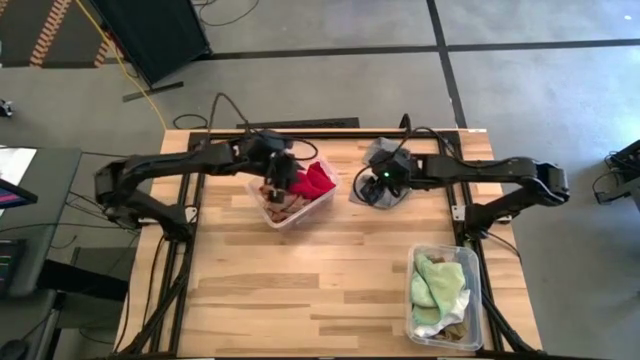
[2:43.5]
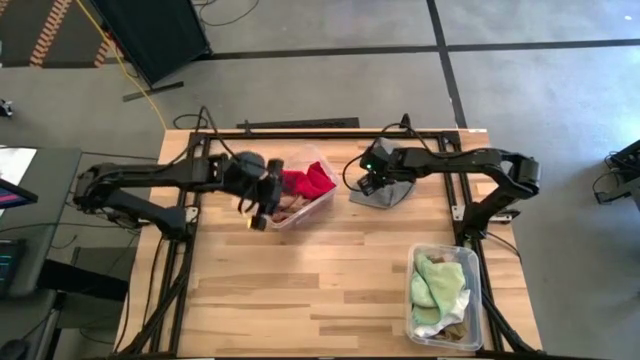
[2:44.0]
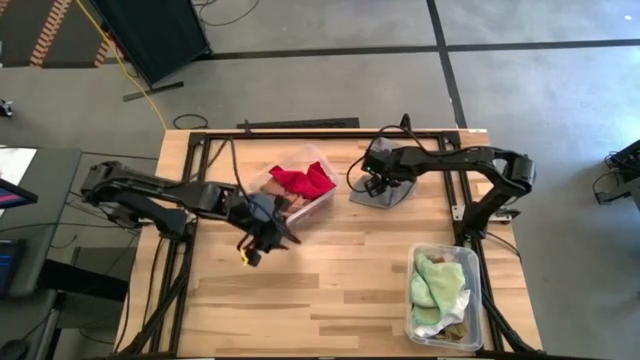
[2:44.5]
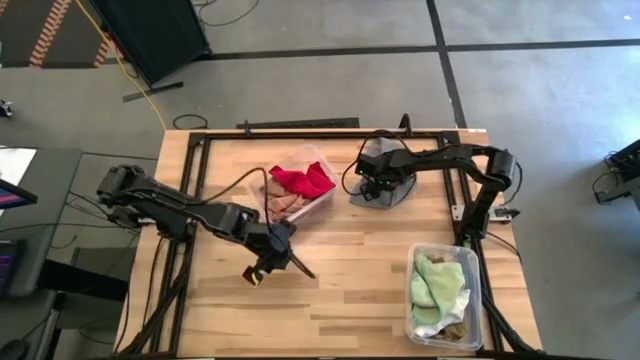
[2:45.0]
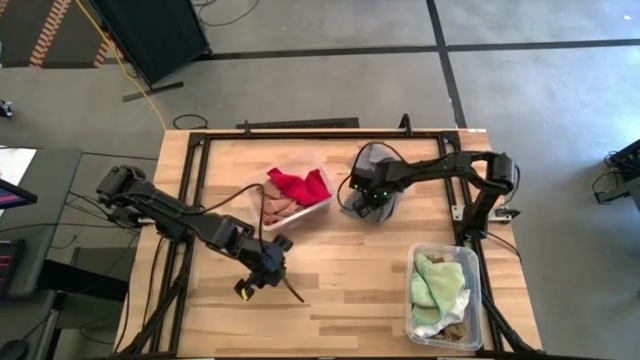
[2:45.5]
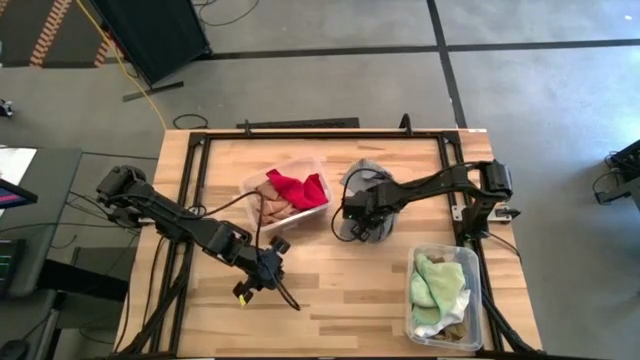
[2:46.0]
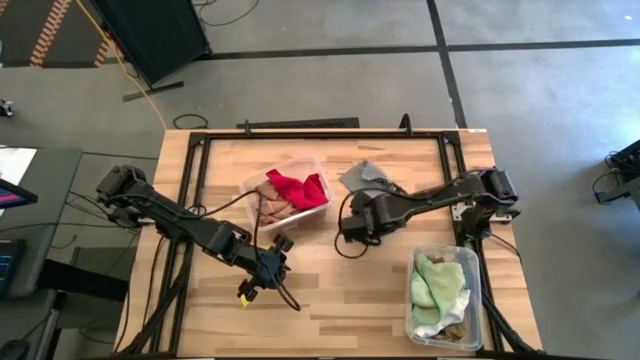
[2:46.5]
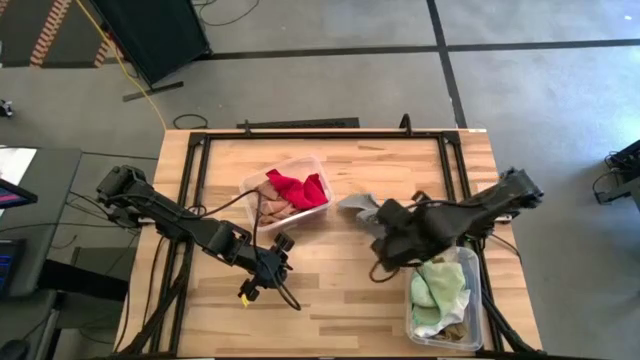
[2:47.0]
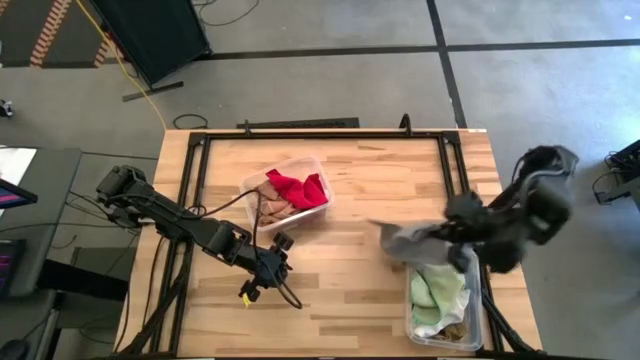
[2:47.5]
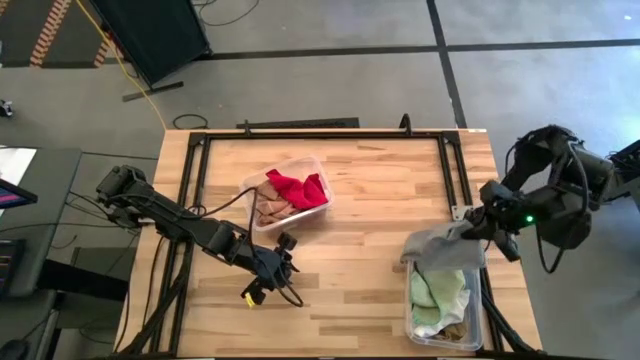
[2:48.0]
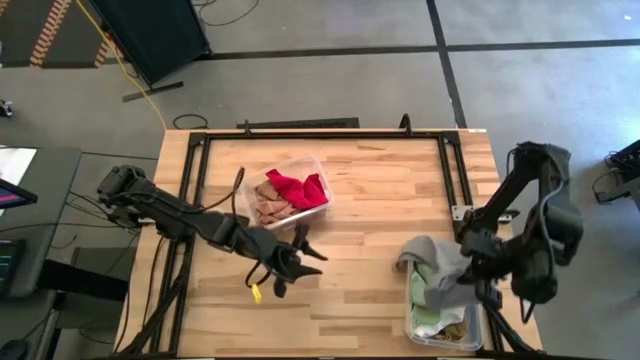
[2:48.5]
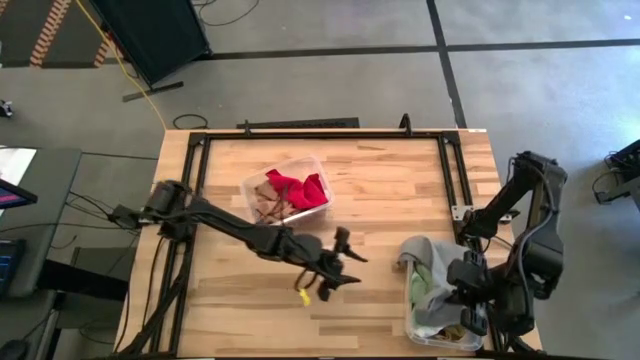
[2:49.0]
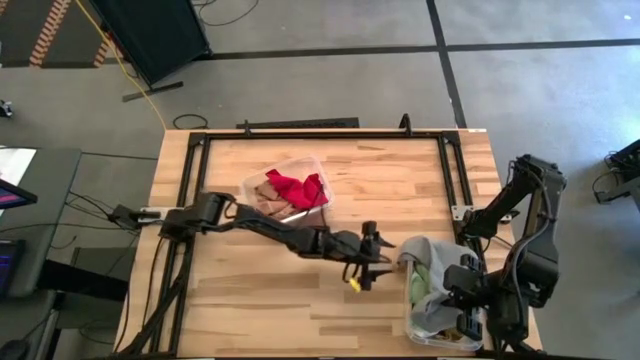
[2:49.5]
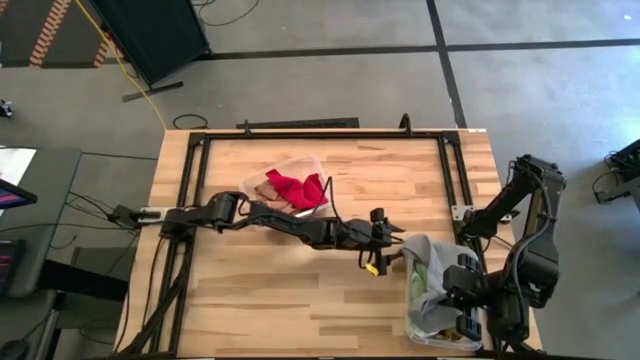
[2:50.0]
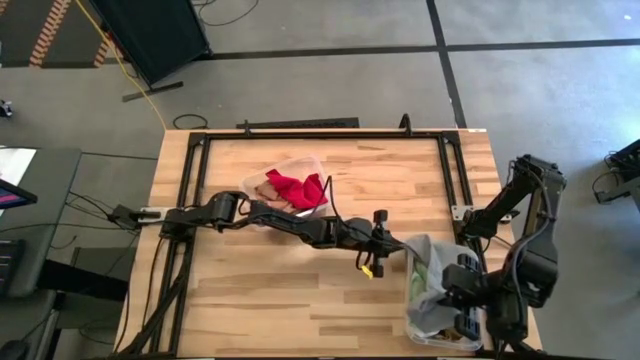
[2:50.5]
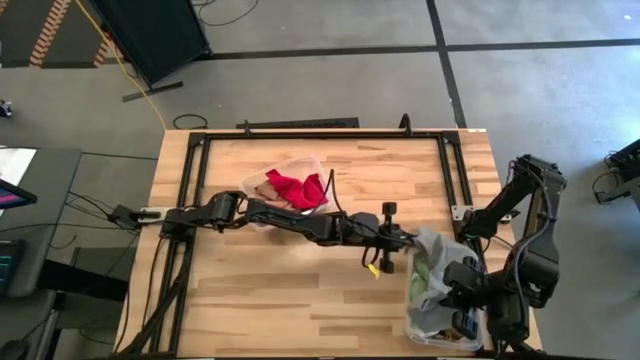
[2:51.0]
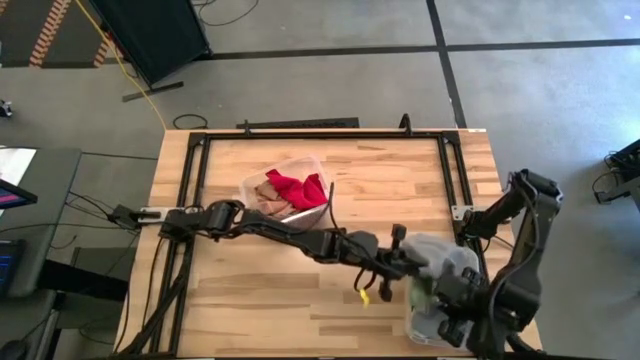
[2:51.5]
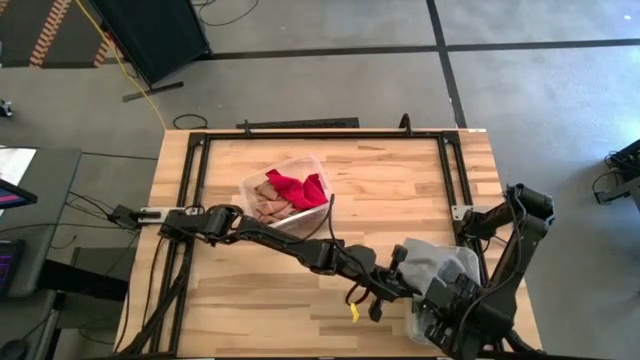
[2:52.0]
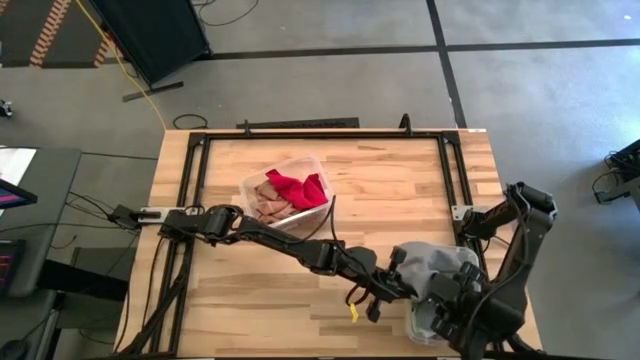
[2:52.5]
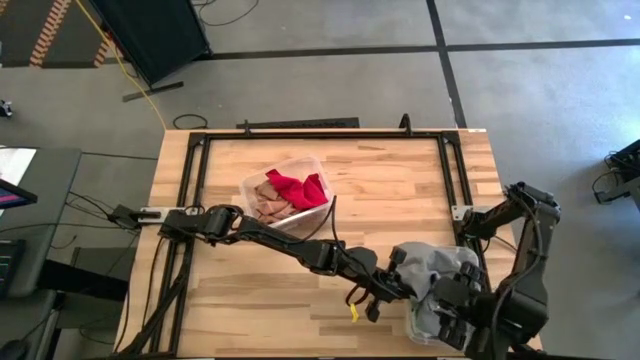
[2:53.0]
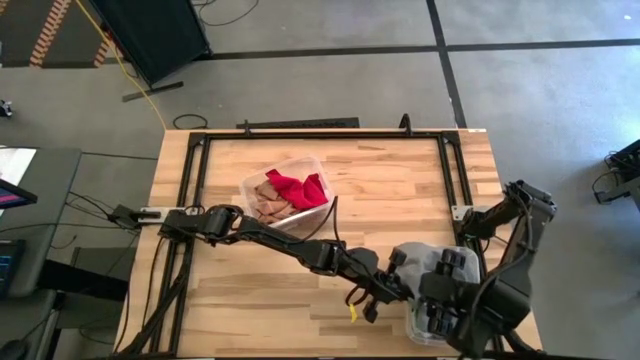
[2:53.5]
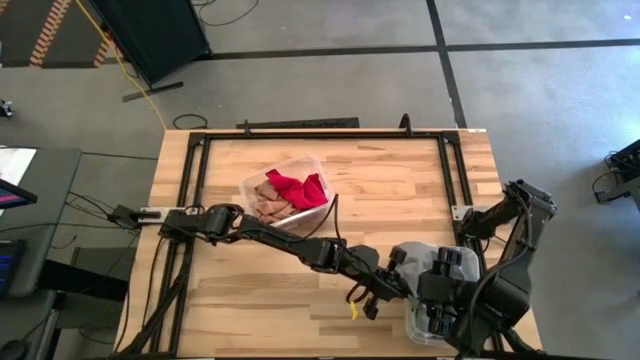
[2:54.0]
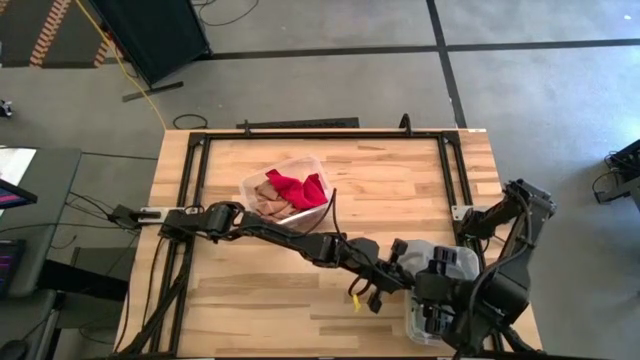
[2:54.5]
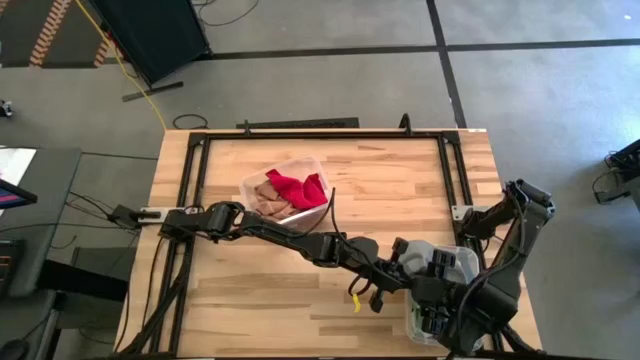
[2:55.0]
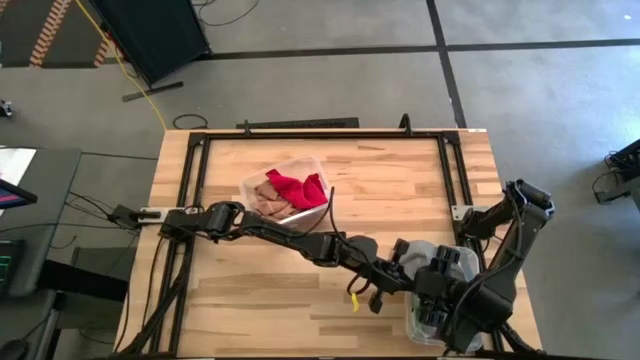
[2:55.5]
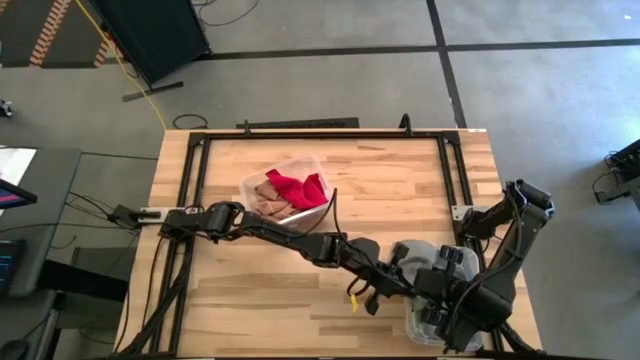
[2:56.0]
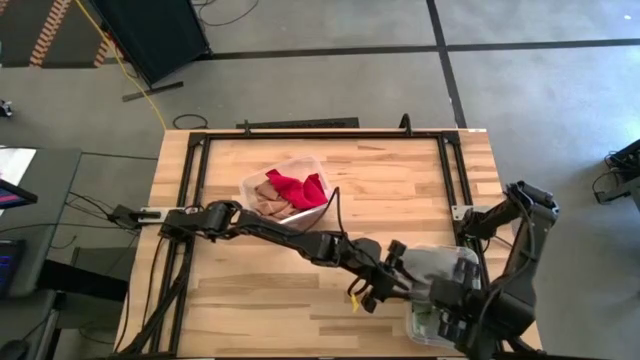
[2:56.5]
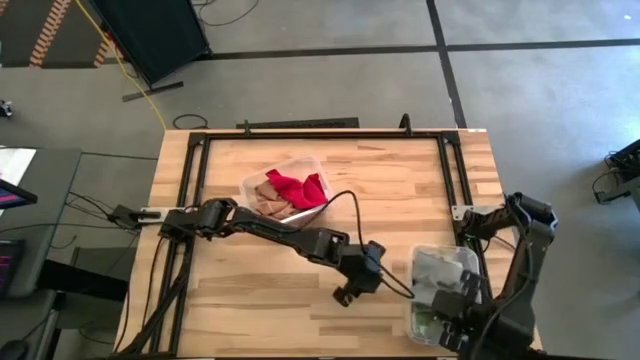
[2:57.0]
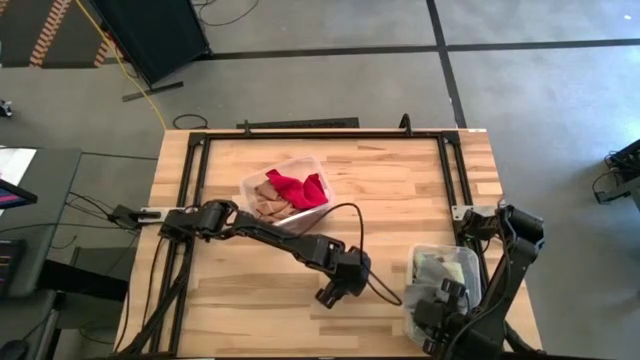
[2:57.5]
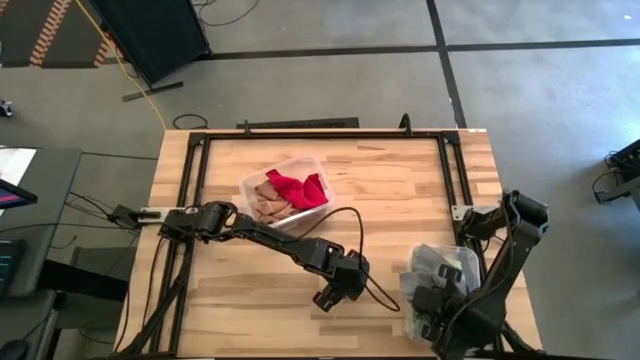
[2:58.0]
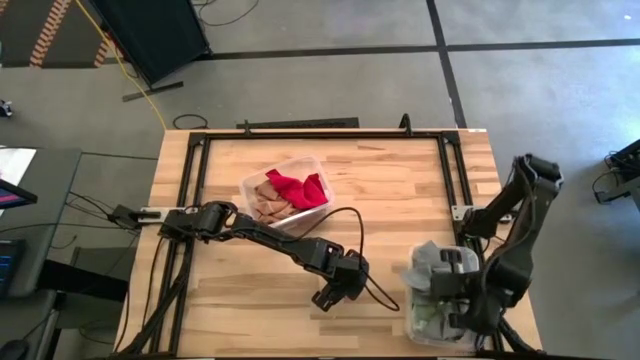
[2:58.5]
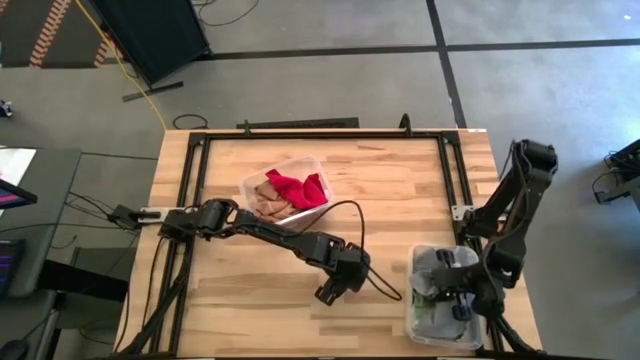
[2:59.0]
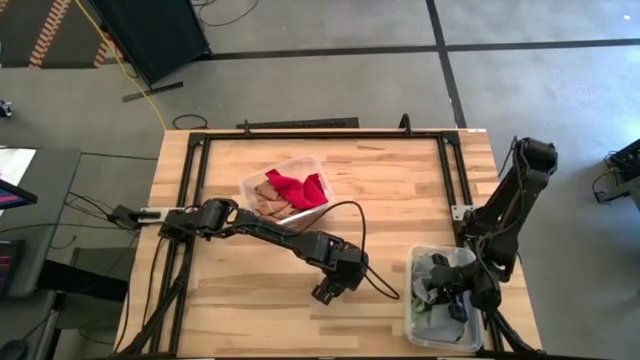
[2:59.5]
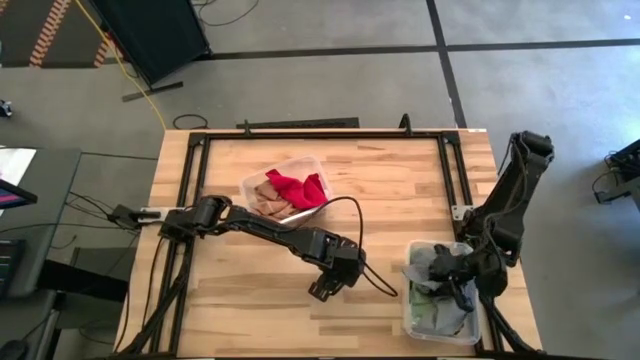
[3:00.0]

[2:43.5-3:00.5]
Task: Sort towels by color in basket
Put the gray towel into the bottom transparent bin

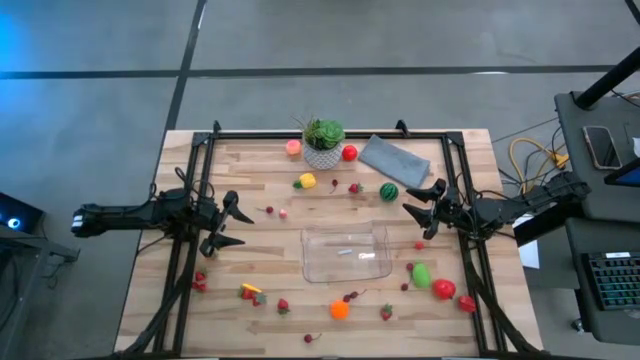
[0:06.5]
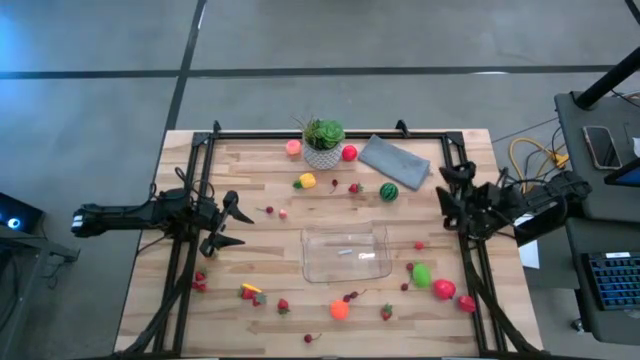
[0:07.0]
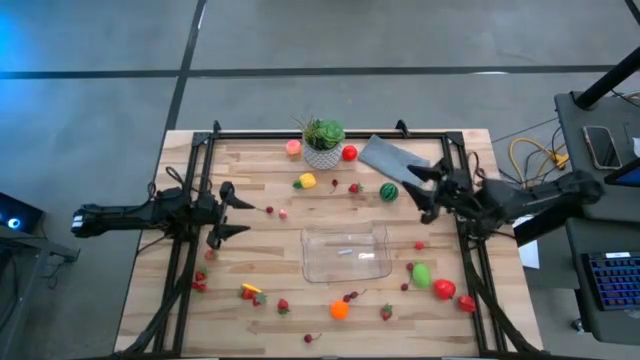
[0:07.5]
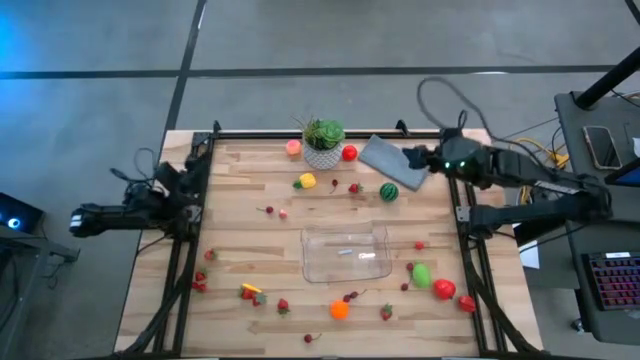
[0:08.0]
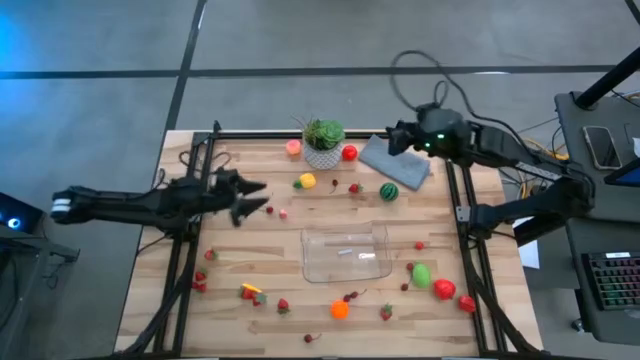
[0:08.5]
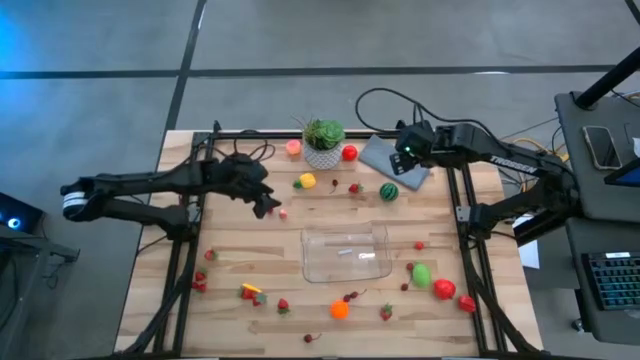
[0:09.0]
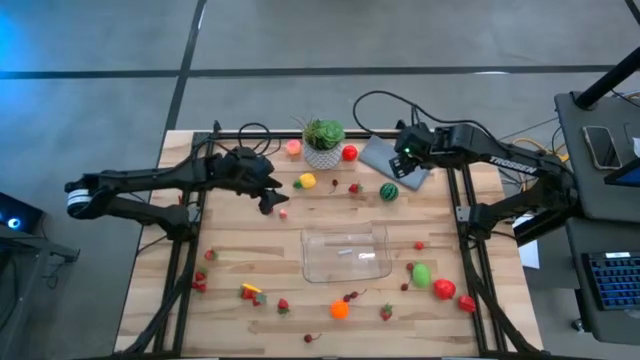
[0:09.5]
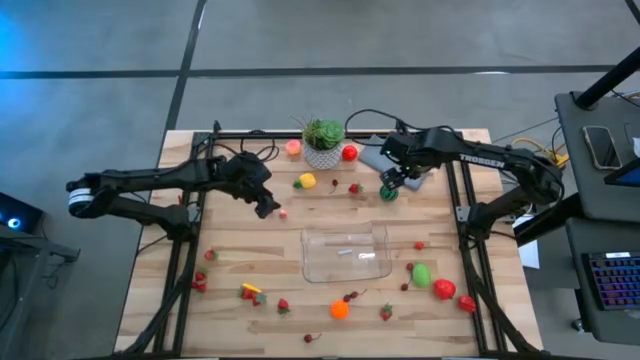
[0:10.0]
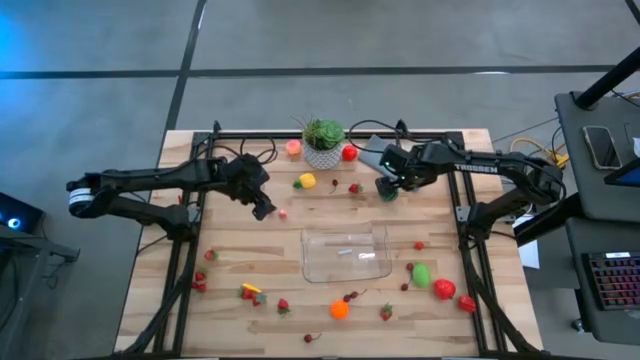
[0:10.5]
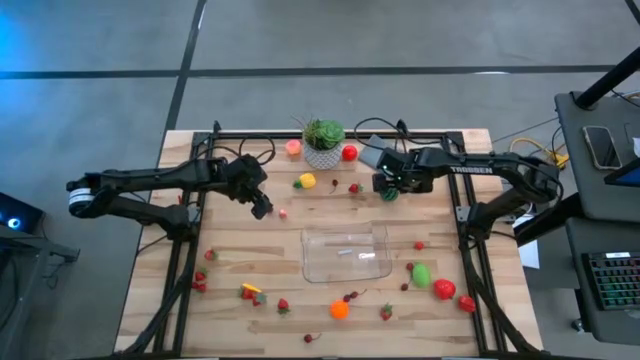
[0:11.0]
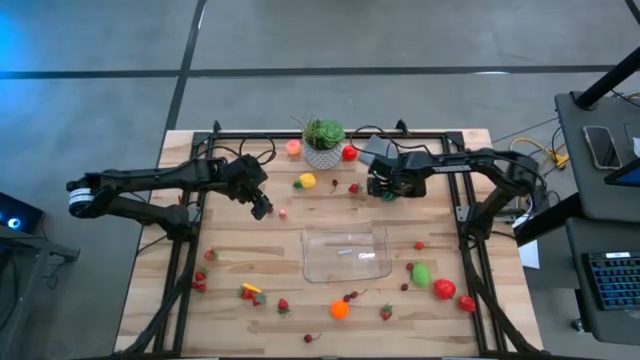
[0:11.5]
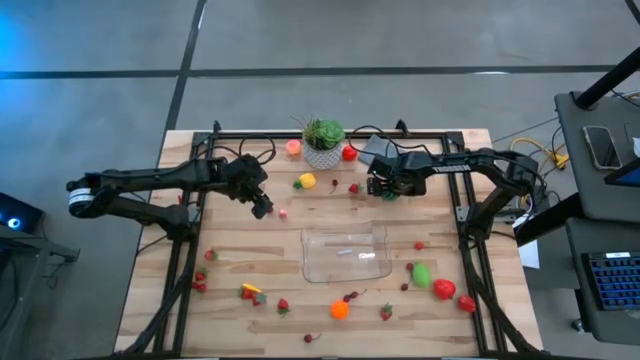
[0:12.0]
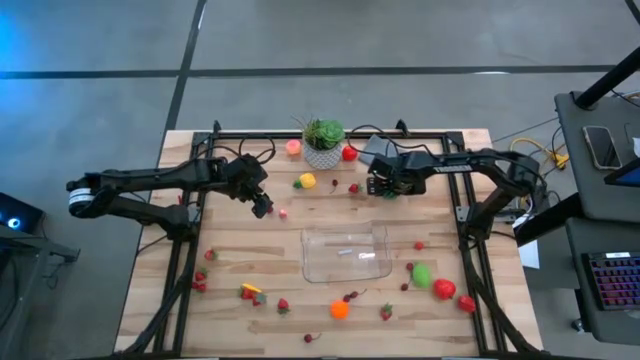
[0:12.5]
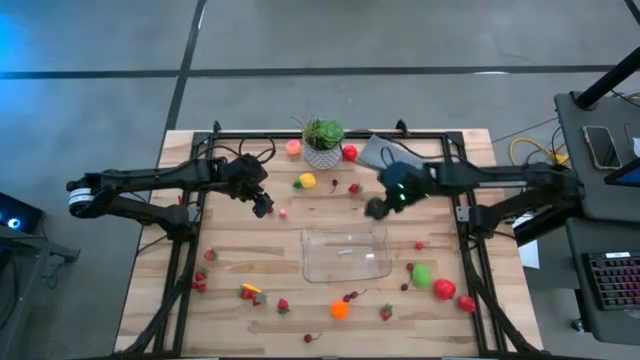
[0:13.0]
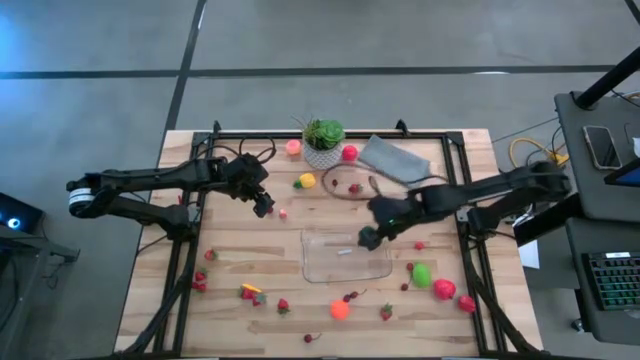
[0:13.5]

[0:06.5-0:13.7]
Task: Pick and placing Produce into tupperware
Put the watermelon into the transparent bin
